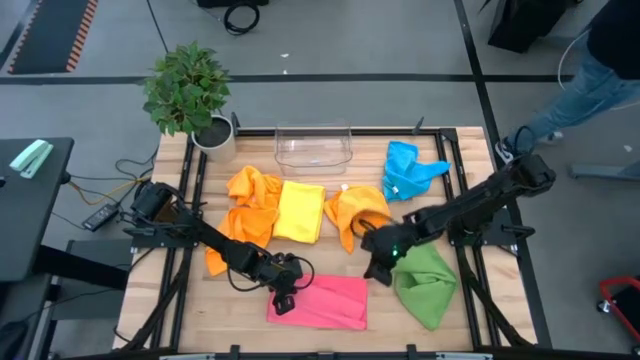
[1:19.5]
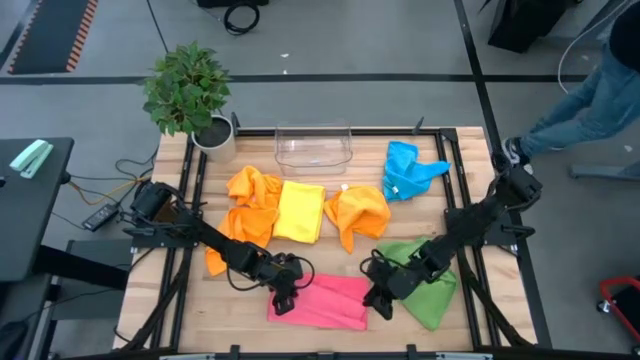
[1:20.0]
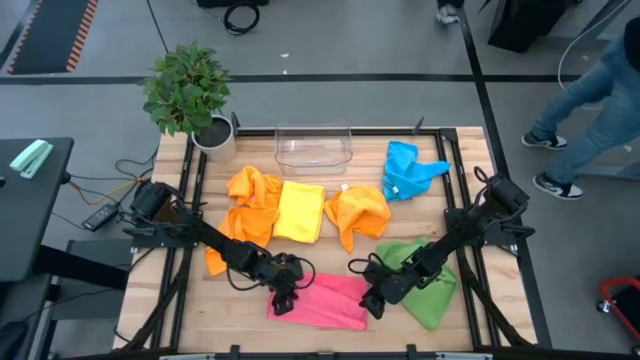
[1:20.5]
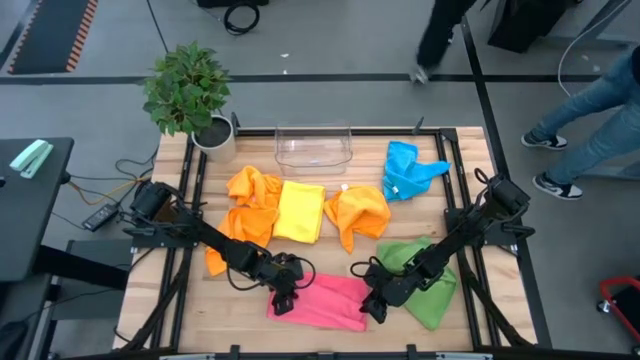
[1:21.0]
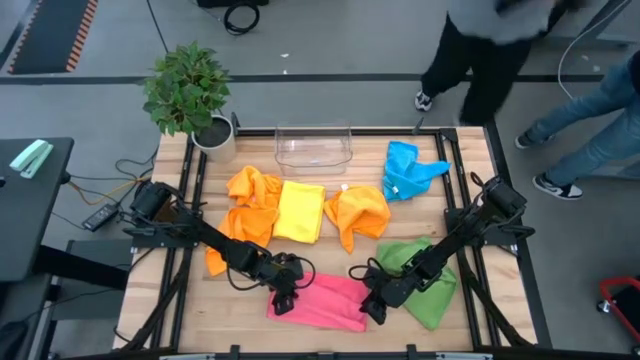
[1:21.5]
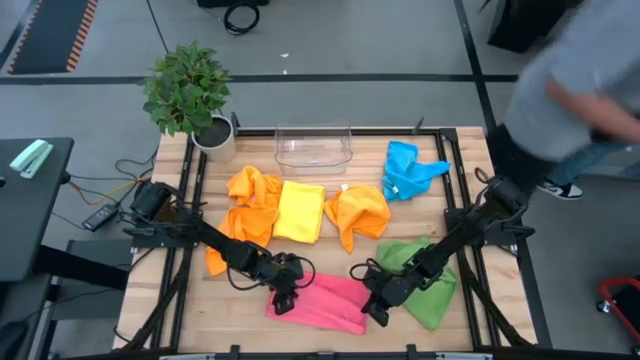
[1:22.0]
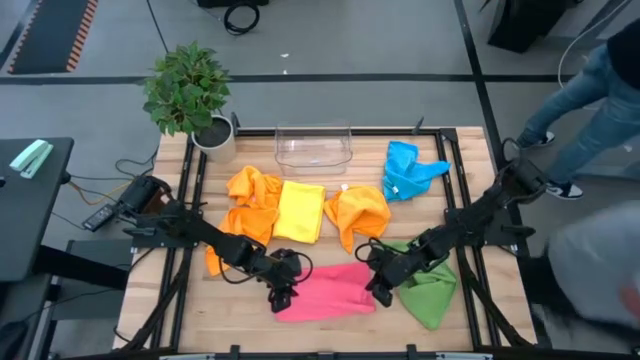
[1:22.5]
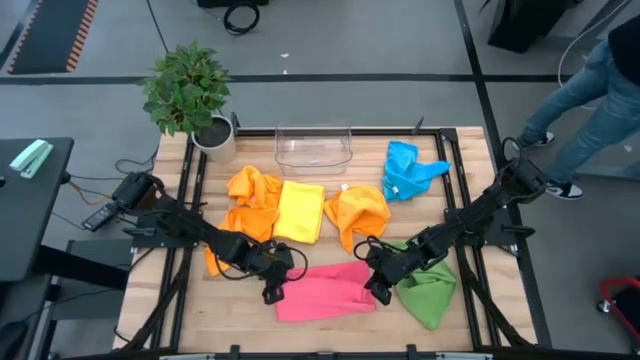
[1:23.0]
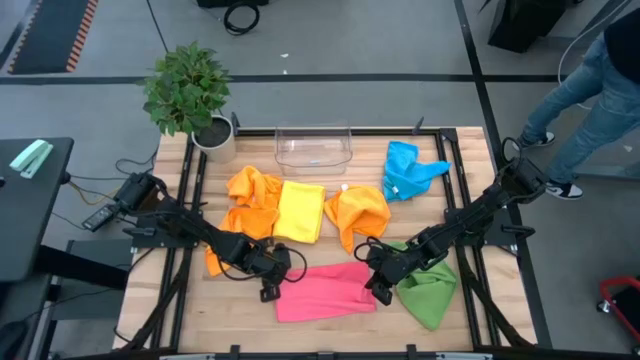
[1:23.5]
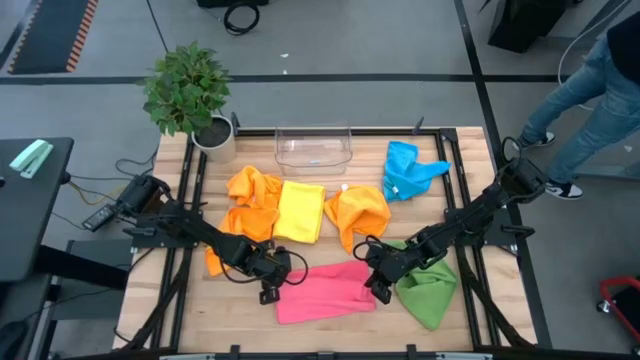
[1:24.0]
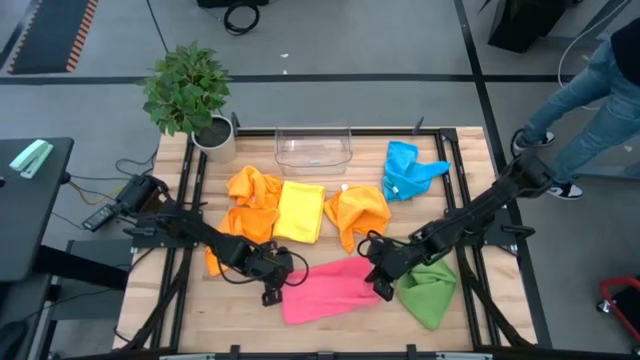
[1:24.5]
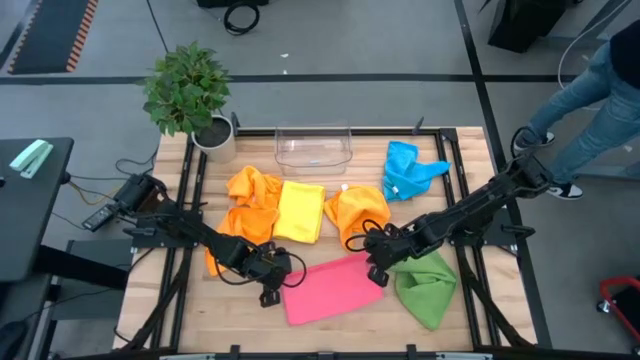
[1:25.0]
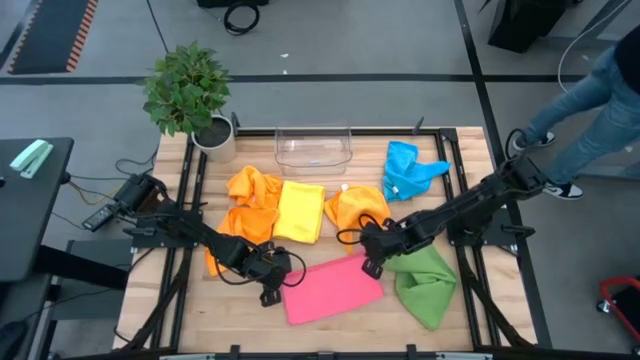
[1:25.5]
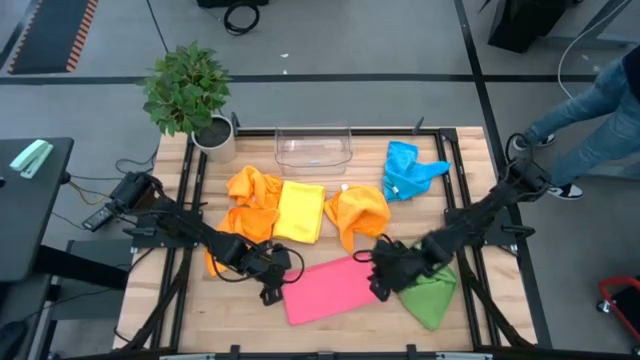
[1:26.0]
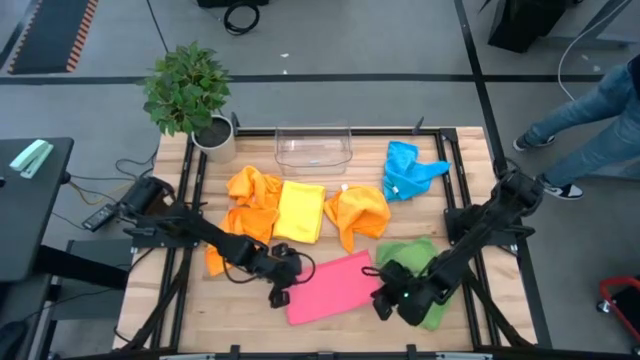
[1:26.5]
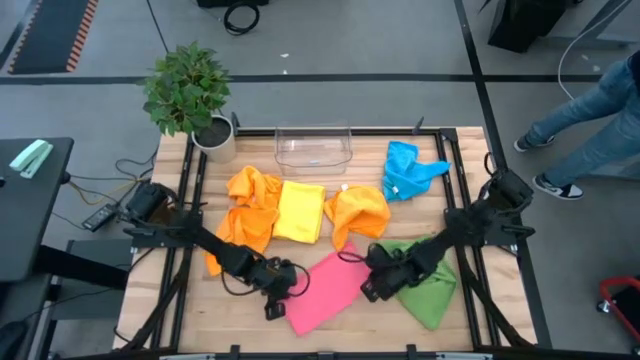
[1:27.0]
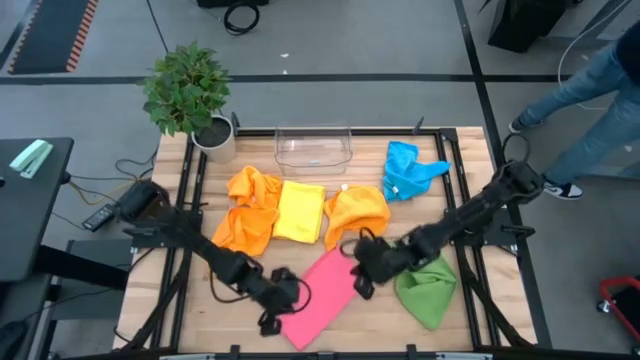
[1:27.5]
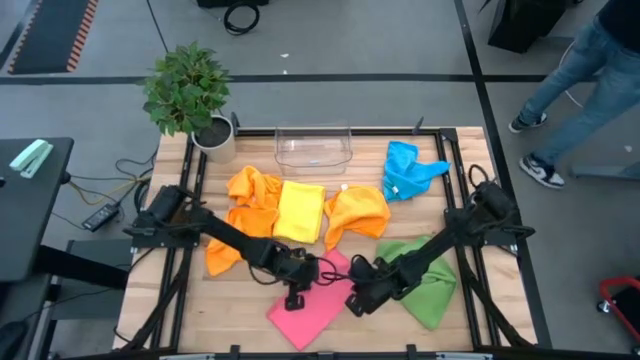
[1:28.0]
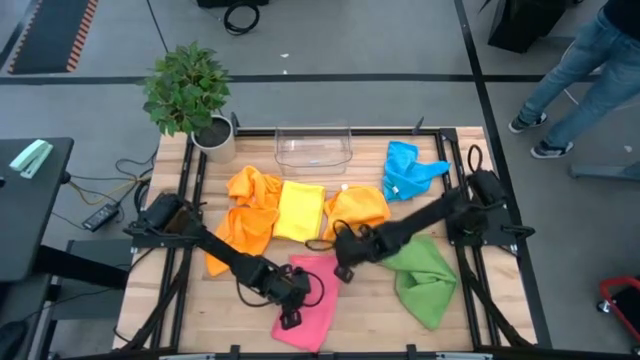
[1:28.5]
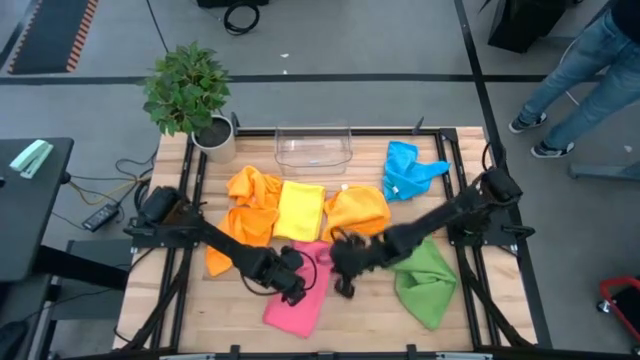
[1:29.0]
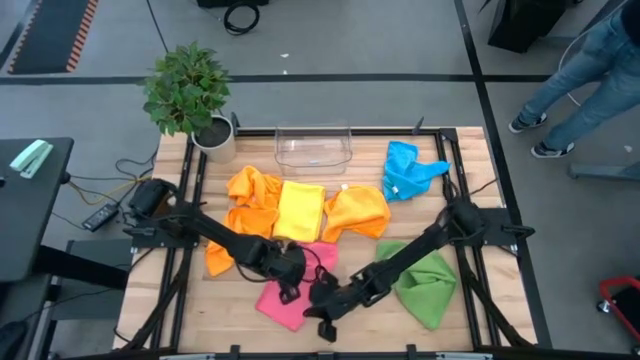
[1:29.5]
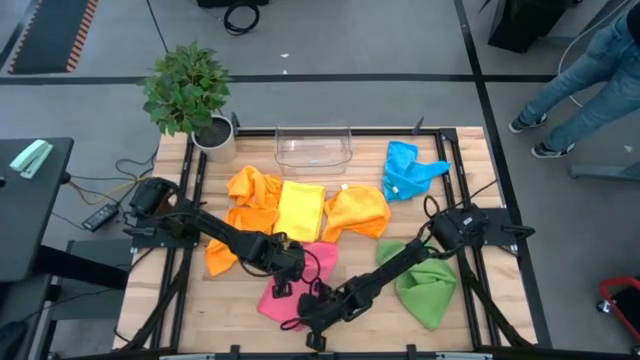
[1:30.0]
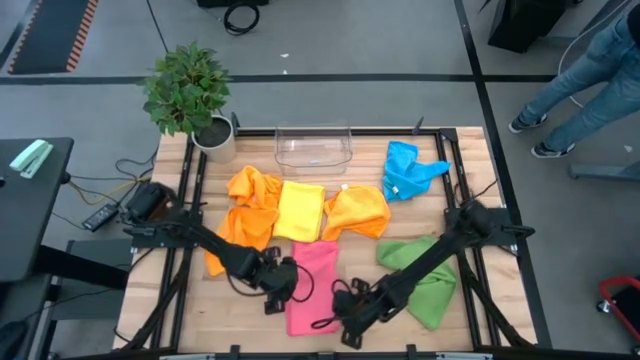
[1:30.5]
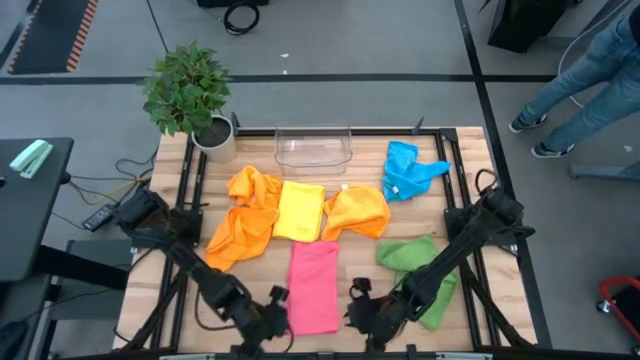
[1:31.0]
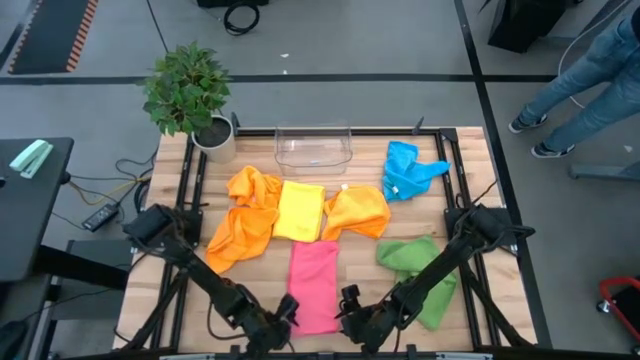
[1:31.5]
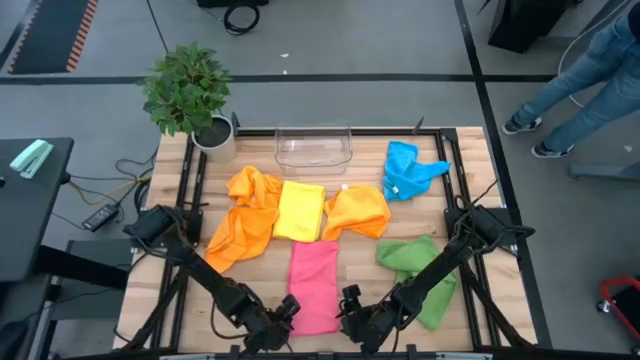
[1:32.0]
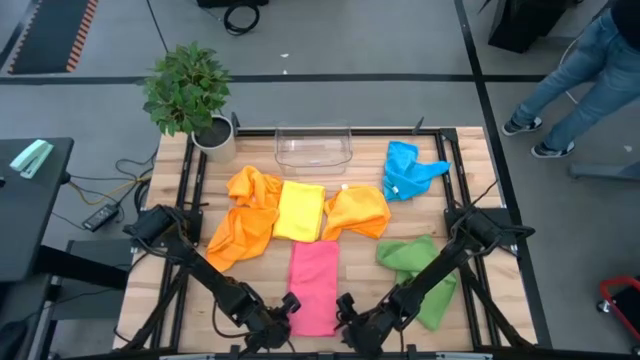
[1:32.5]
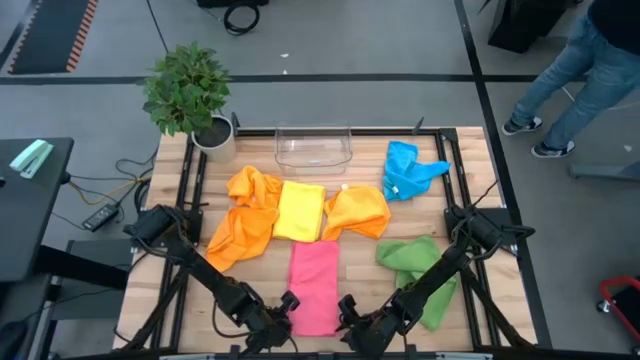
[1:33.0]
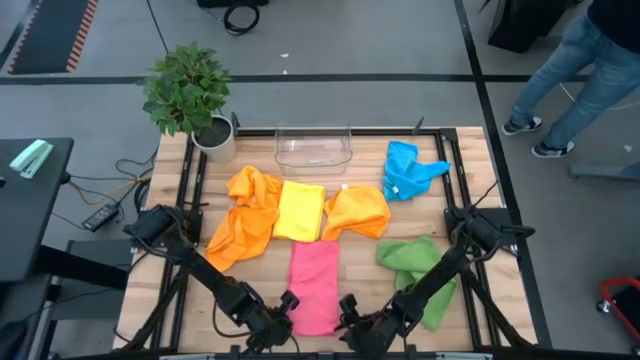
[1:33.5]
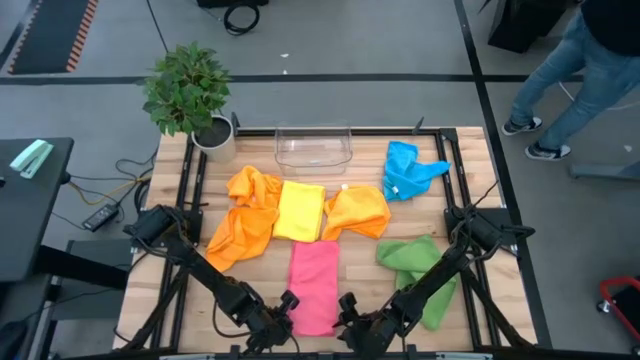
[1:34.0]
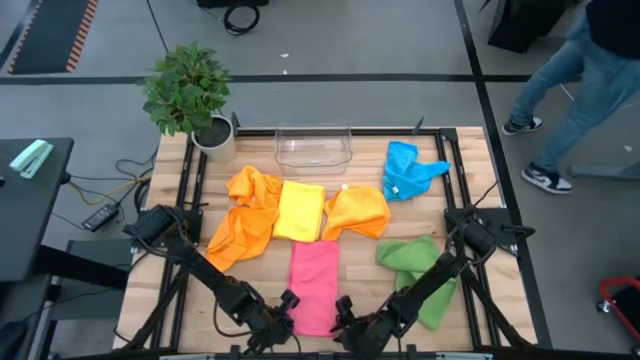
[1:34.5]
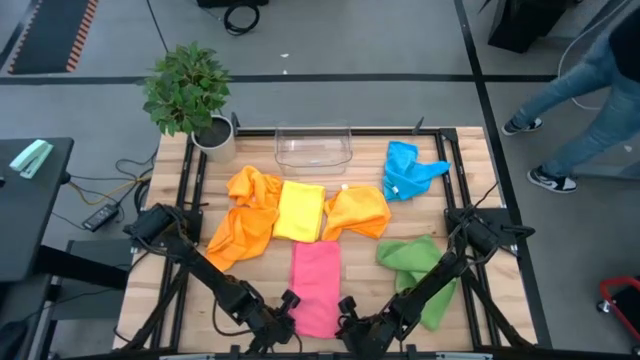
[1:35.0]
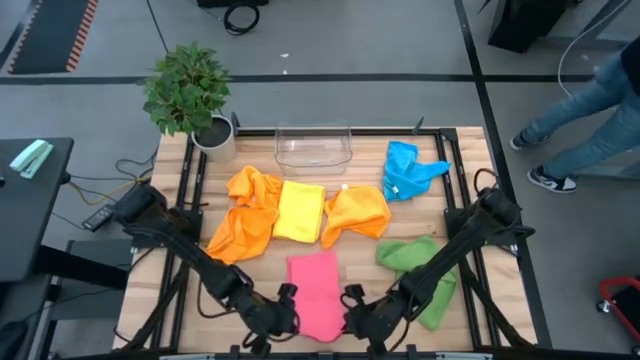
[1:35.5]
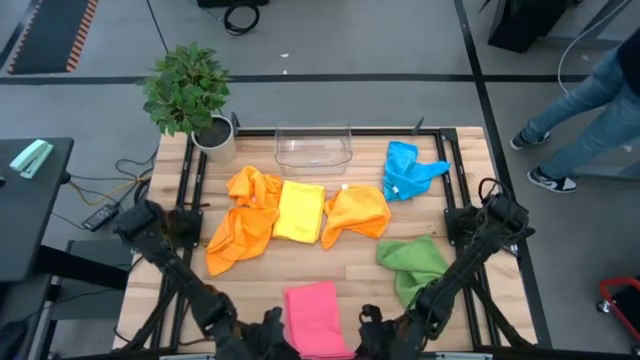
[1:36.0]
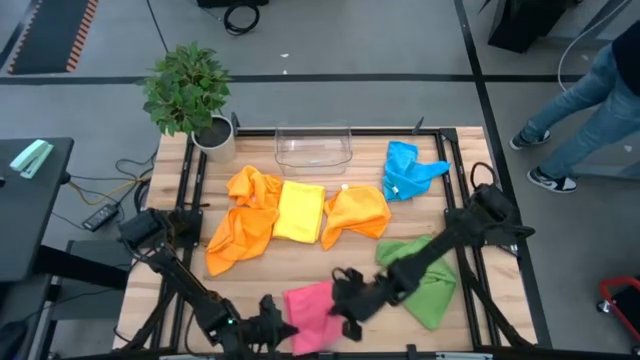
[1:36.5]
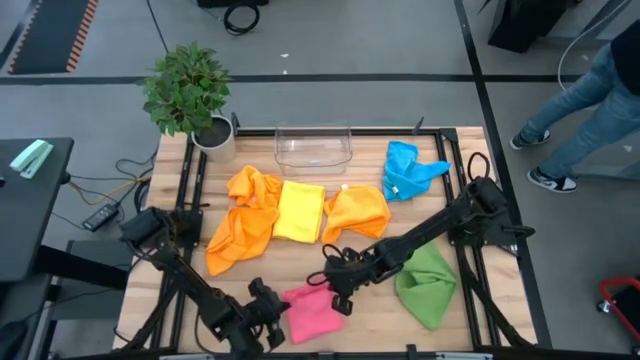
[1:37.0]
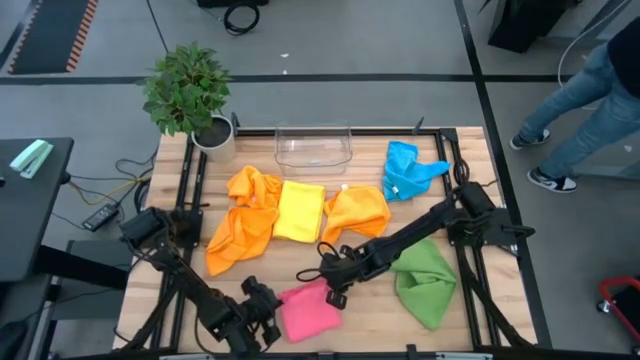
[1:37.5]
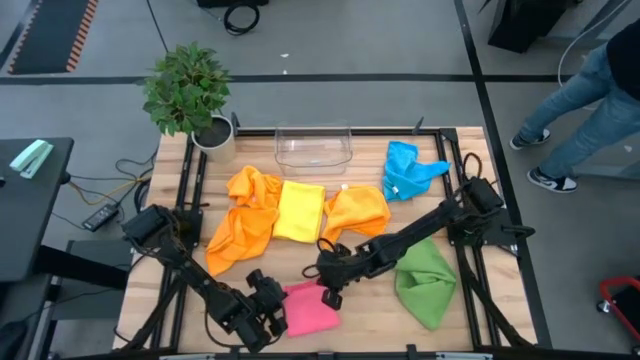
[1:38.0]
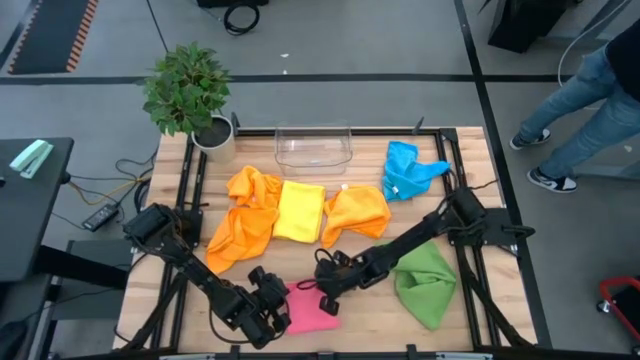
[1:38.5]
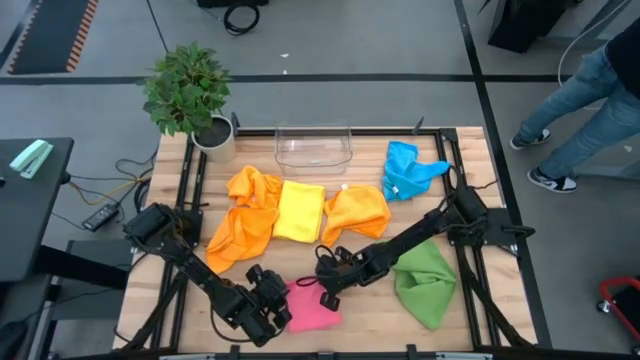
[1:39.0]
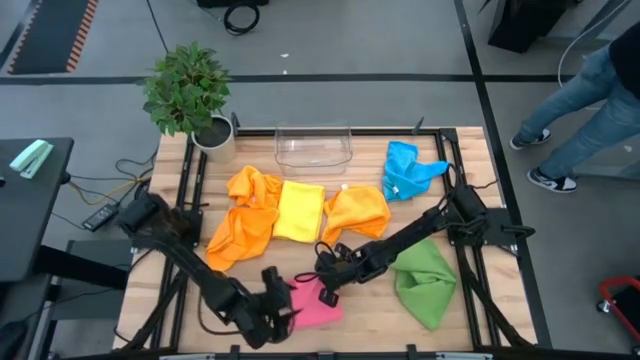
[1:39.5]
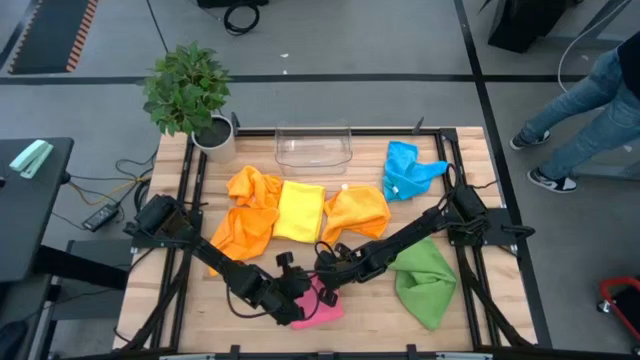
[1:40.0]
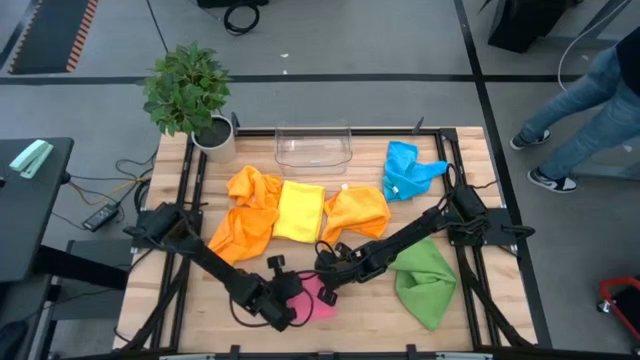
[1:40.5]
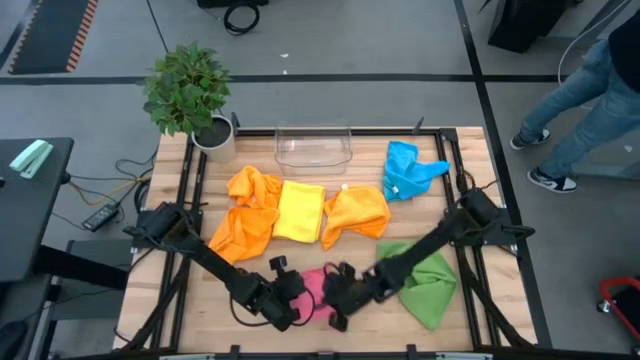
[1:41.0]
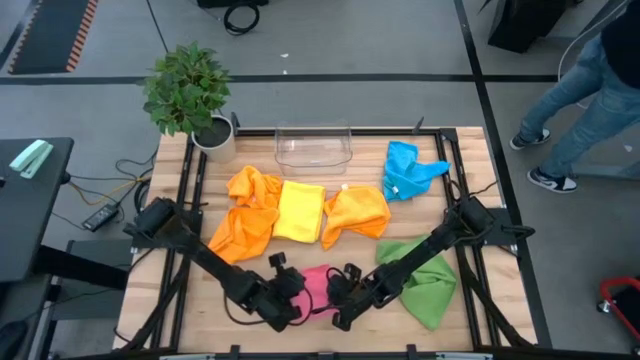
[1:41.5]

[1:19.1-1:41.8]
Task: Fold microfiber towels
Fold the pink microfiber cloth
